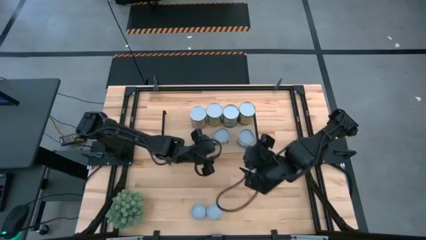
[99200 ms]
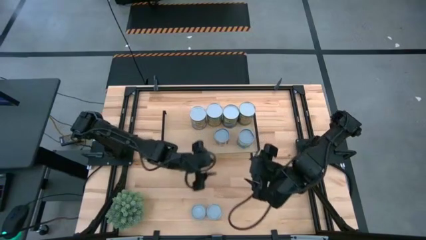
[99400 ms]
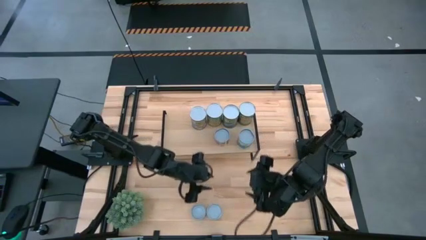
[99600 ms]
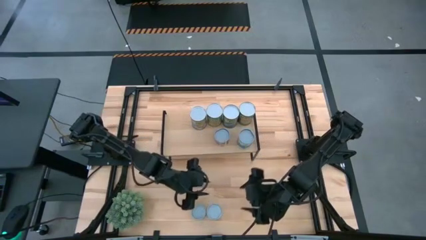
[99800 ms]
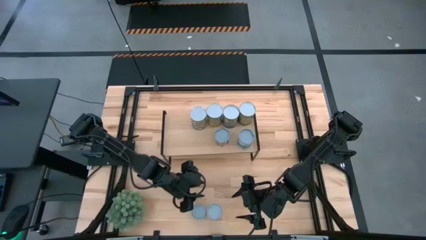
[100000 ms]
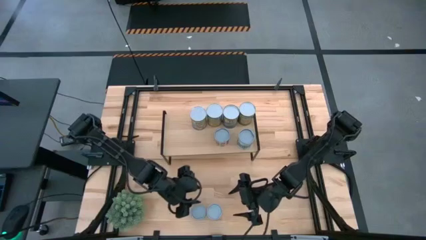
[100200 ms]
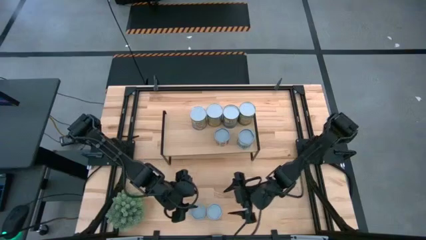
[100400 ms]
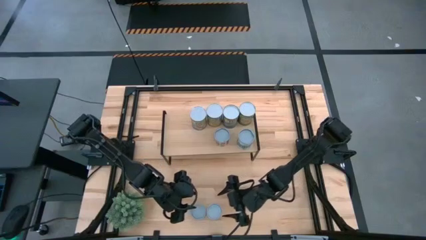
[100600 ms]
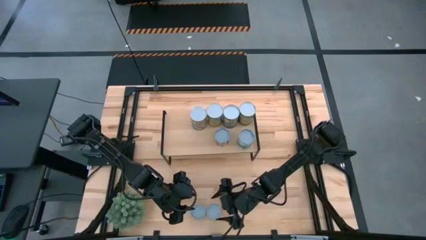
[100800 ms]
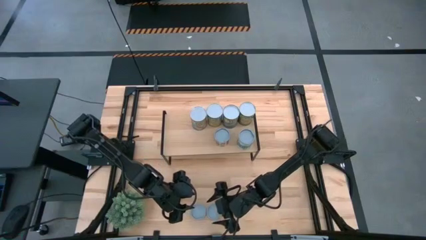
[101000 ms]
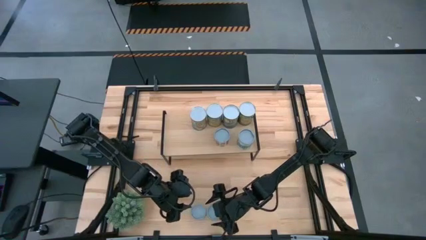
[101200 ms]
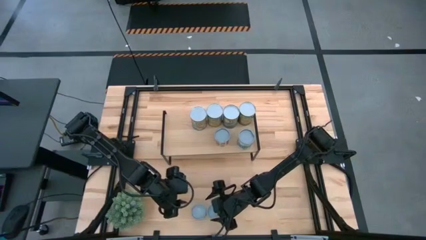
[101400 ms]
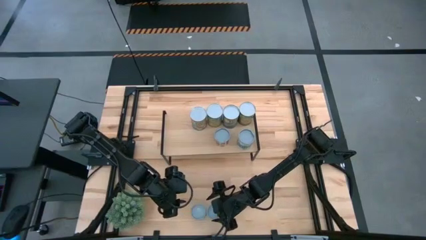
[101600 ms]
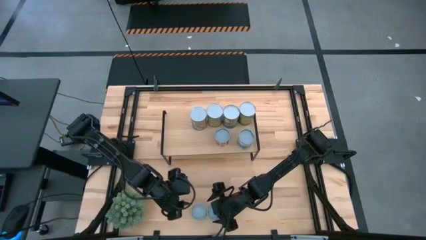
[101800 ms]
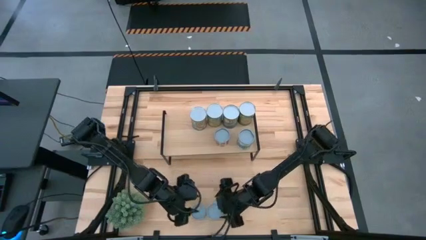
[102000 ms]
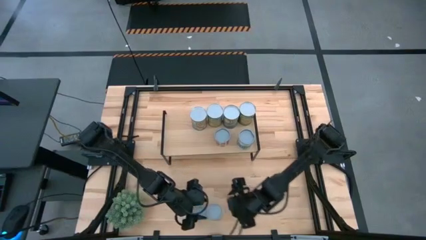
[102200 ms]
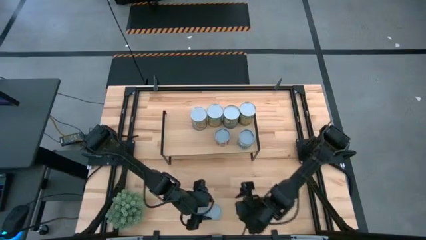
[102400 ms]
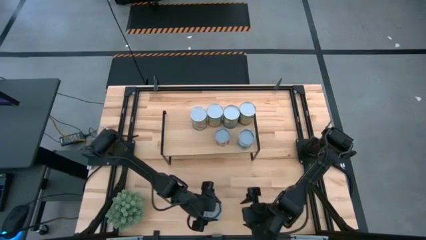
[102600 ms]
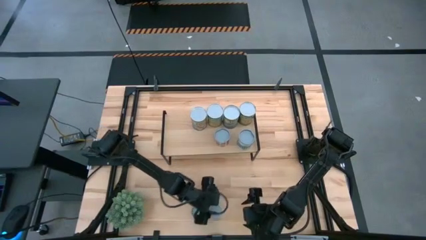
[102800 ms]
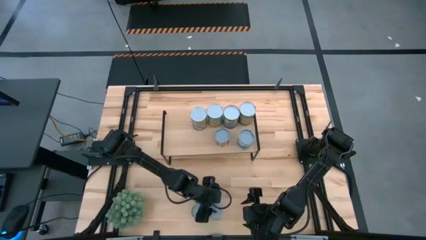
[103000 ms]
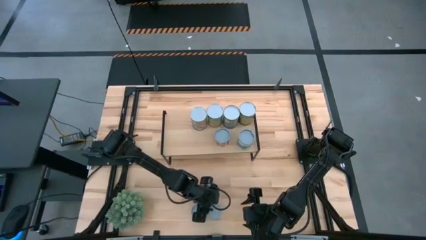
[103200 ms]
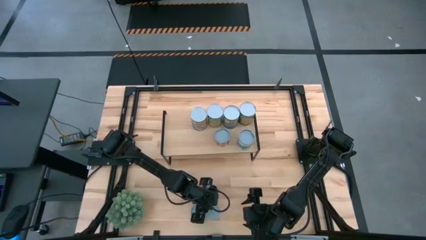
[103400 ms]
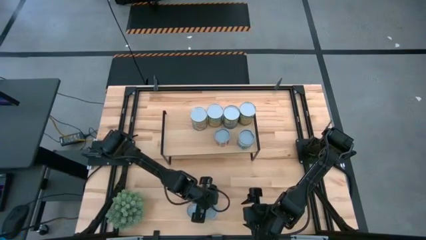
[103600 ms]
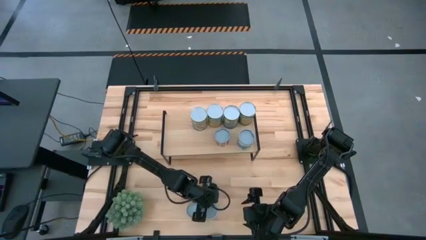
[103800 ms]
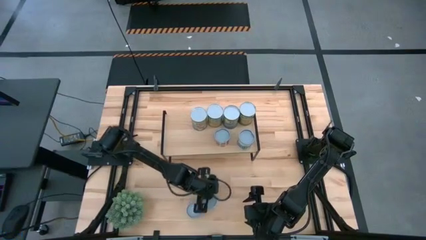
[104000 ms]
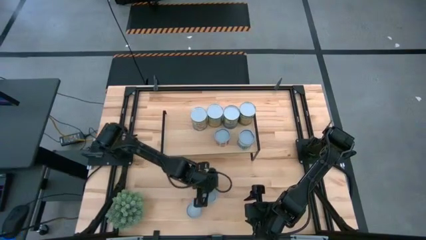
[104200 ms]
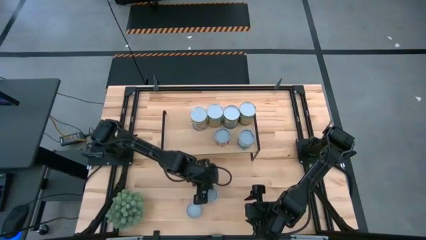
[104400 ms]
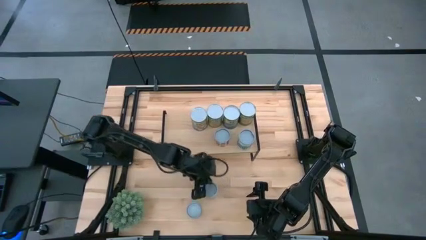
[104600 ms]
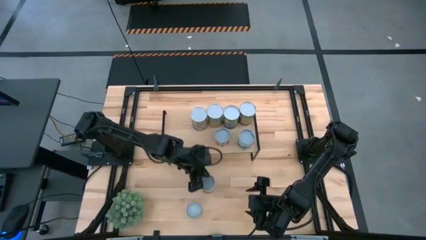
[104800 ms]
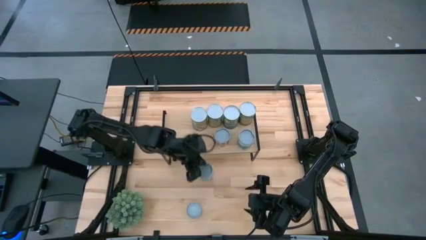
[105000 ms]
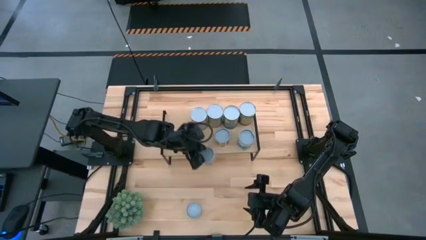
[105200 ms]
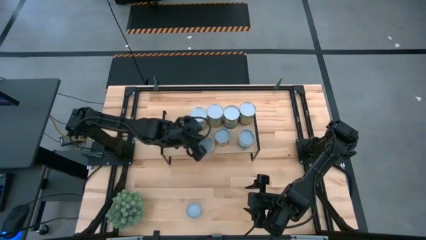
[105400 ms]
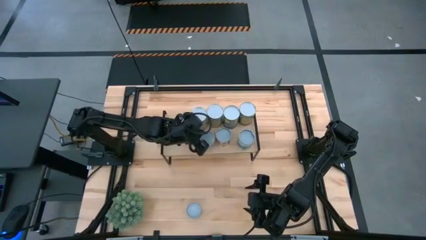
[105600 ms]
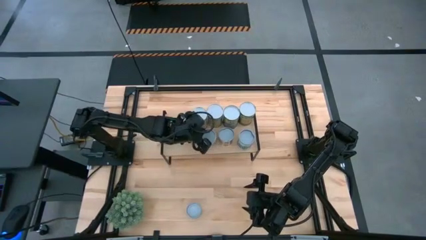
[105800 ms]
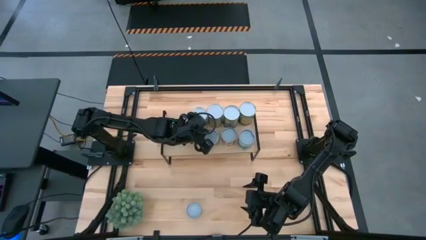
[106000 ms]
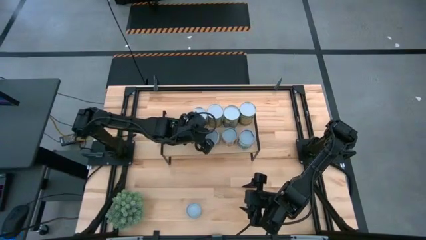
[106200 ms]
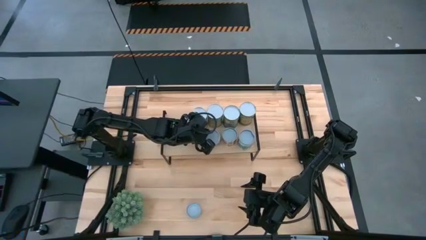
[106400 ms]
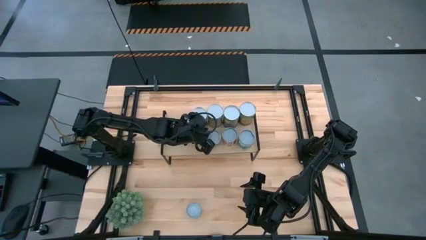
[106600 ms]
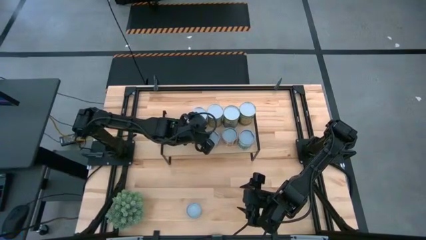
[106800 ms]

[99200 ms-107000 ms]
Task: Pick and place cans onto a shelf
Put the canned green peas on the shelf

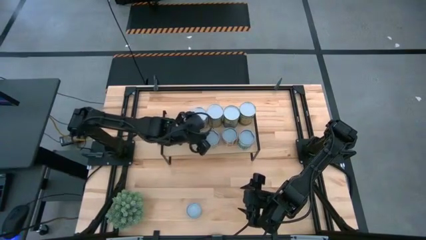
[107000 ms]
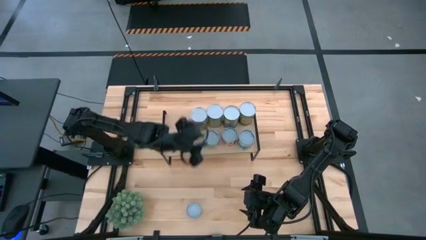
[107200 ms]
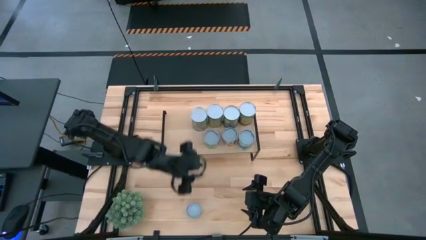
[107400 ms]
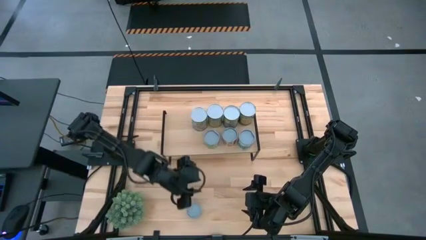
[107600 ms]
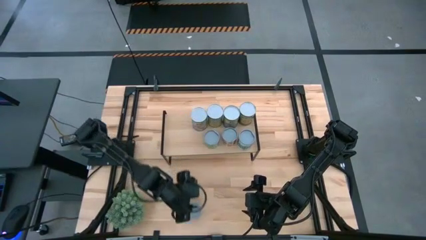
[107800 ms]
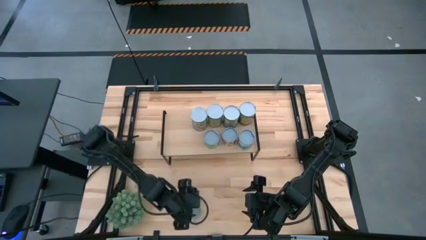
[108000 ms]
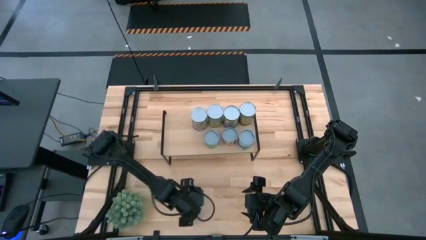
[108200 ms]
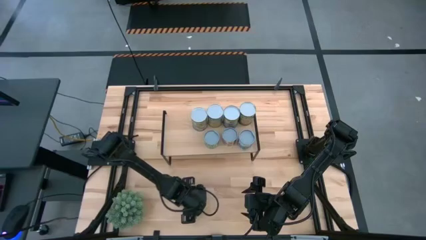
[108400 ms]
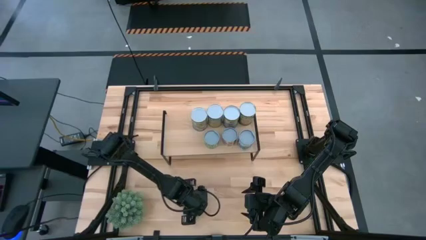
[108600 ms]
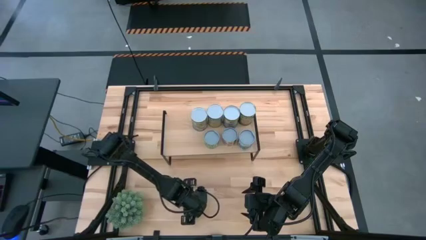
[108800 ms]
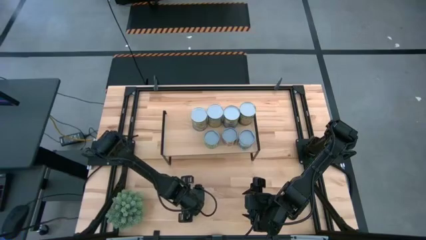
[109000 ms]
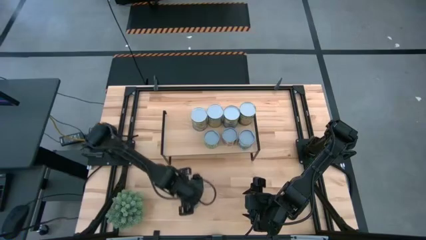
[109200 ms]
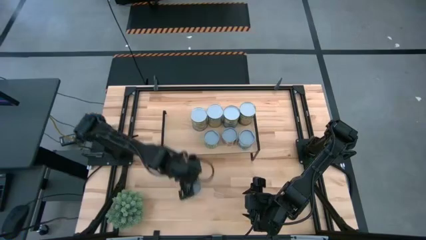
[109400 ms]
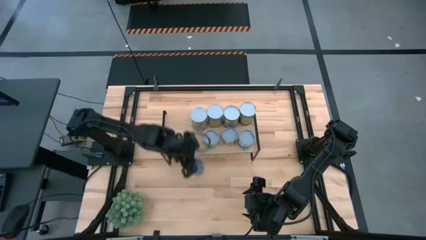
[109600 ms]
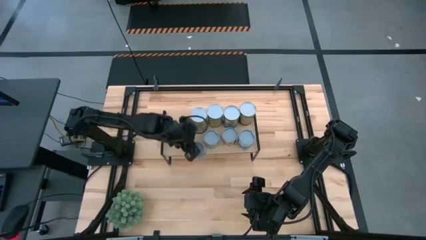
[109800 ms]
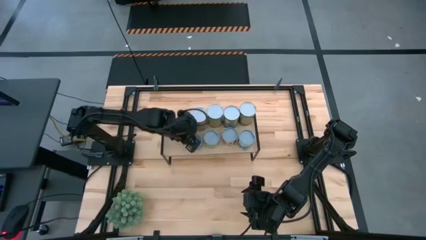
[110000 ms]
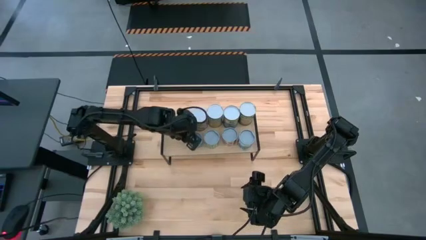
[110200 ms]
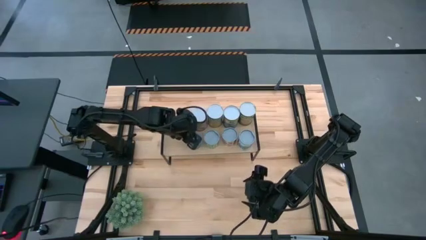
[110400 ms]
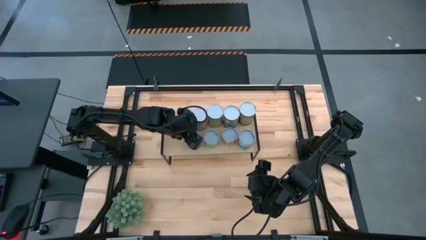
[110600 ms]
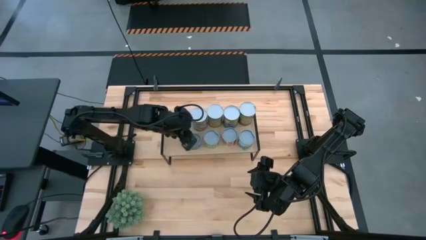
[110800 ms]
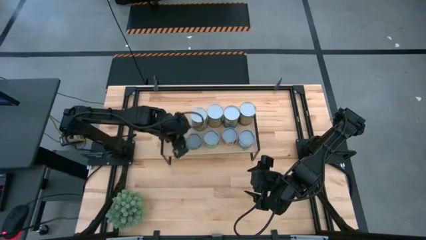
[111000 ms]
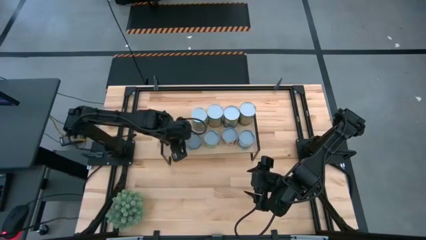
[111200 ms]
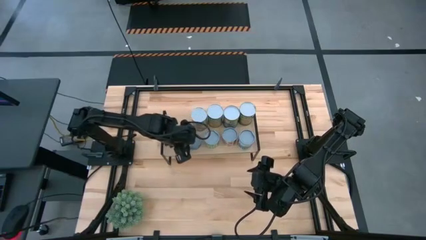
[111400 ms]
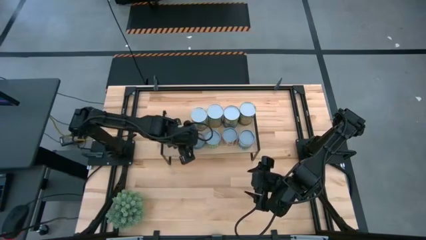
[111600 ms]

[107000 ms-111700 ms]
Put the green tuna can on the shelf

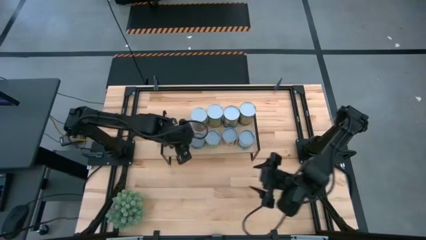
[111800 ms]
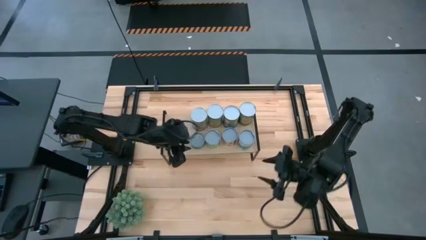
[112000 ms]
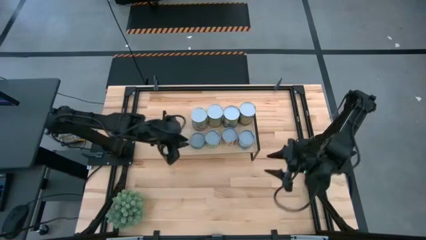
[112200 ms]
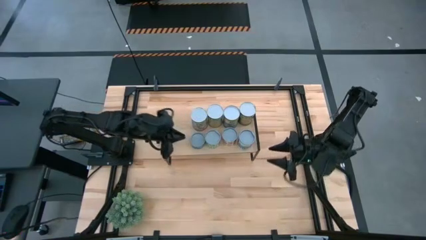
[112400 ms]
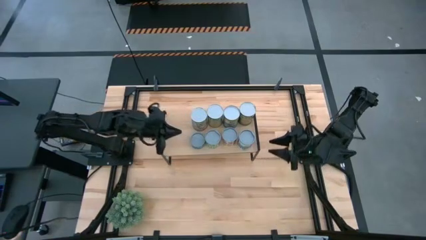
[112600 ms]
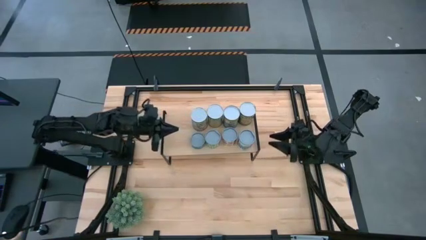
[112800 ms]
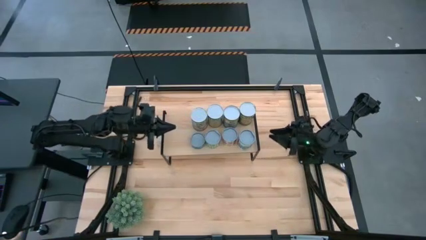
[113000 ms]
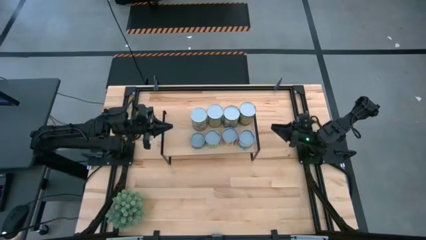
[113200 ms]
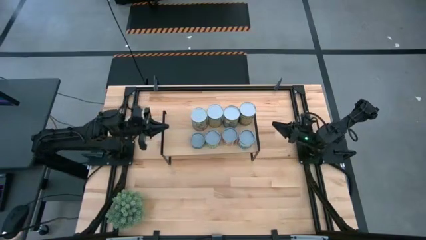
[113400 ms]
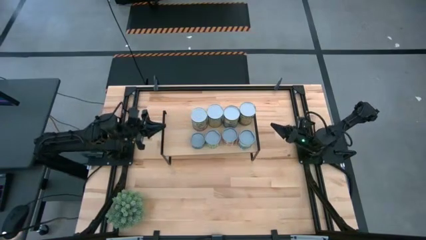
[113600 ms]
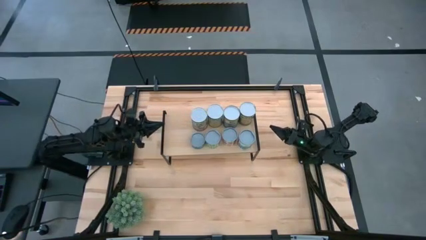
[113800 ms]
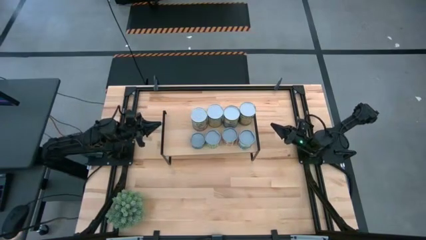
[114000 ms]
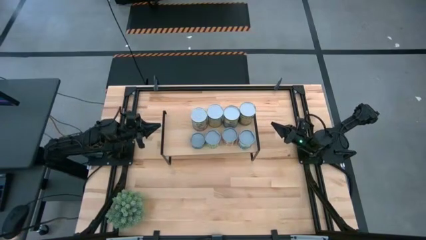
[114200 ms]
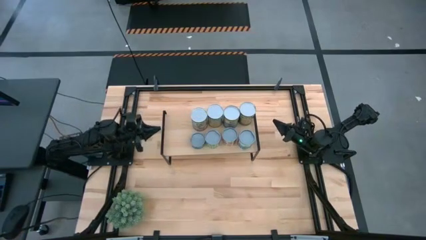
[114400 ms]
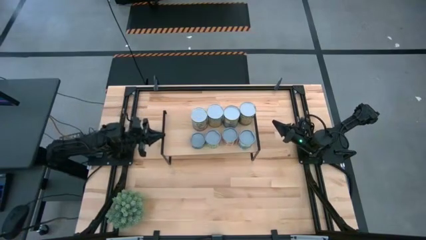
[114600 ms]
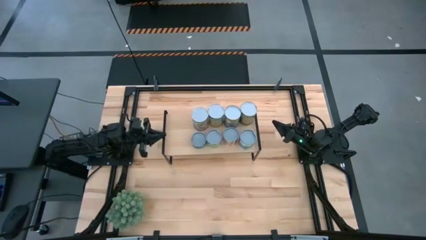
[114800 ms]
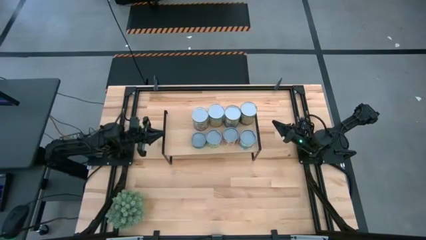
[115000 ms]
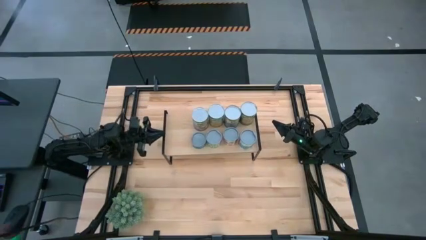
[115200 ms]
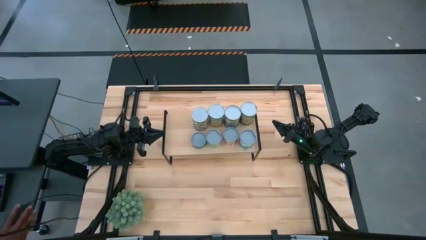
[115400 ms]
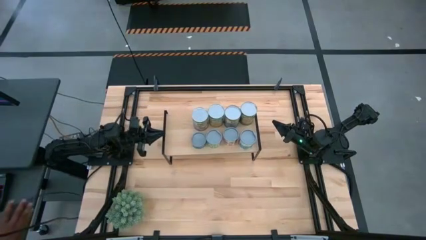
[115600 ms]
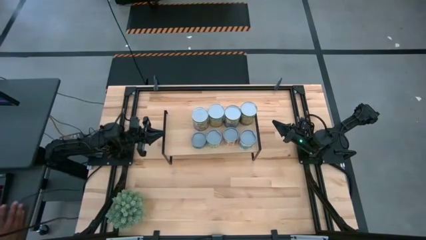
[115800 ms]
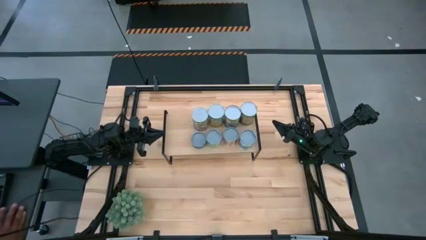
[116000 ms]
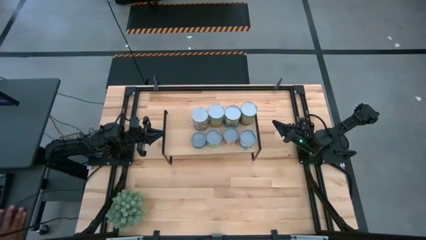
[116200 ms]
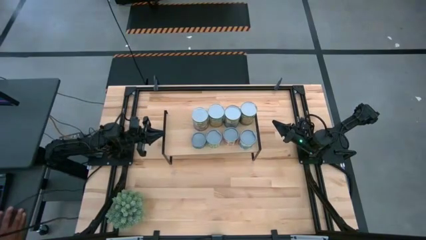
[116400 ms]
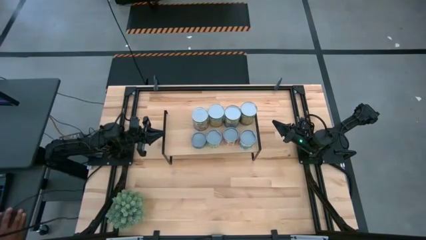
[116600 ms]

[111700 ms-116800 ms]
Return to Home Position
